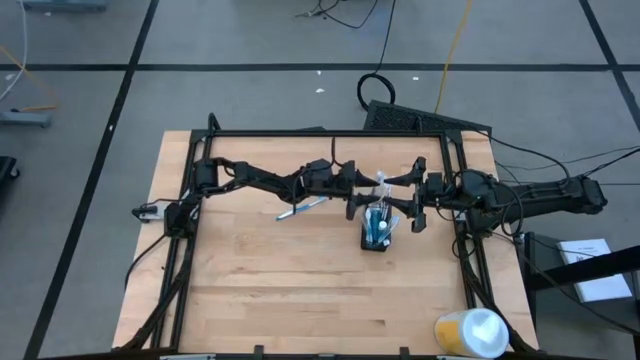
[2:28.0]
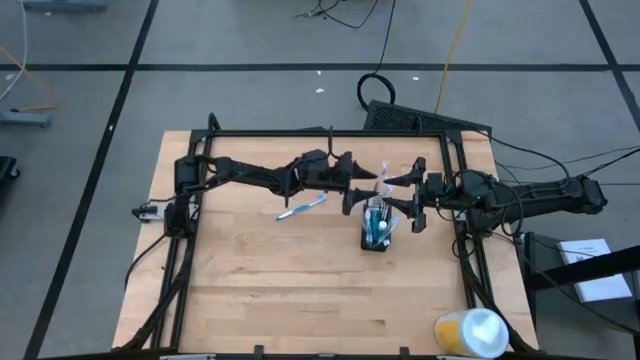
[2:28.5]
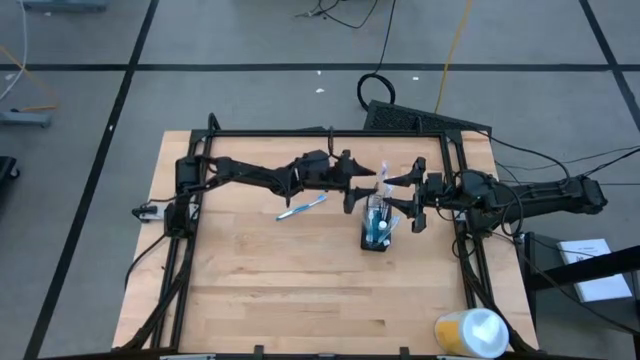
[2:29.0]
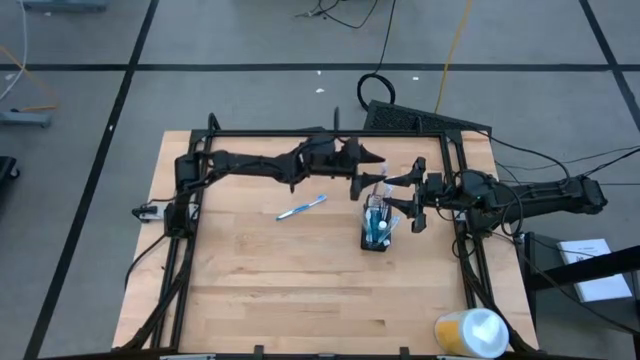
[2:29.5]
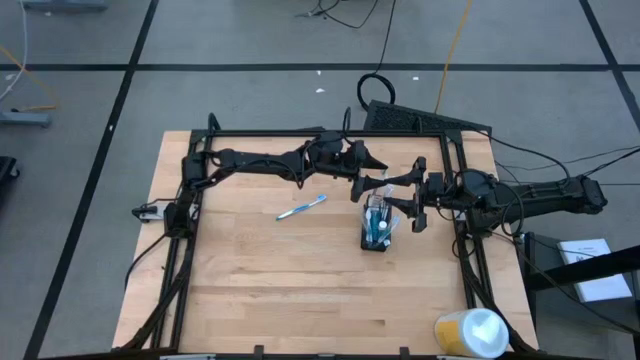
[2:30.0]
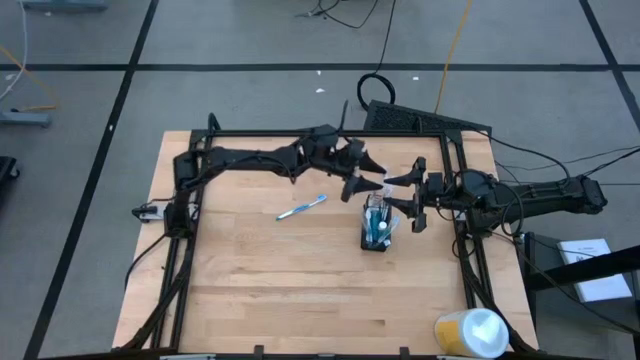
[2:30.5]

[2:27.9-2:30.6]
Task: Pick & Place toothbrushing station
Adjust the purple toothbrush in the mesh organizer

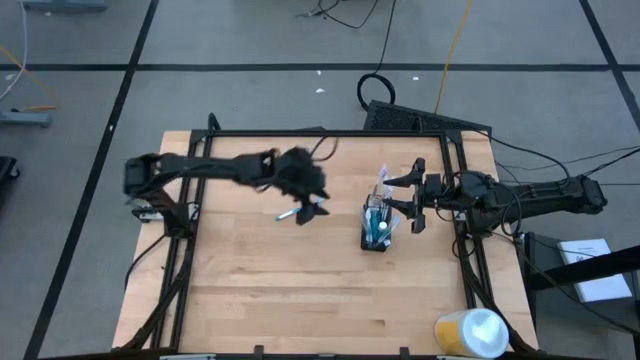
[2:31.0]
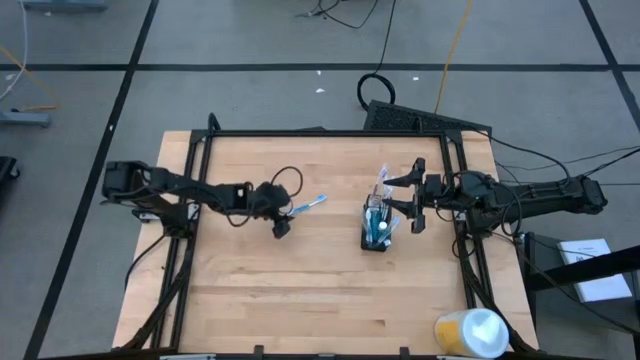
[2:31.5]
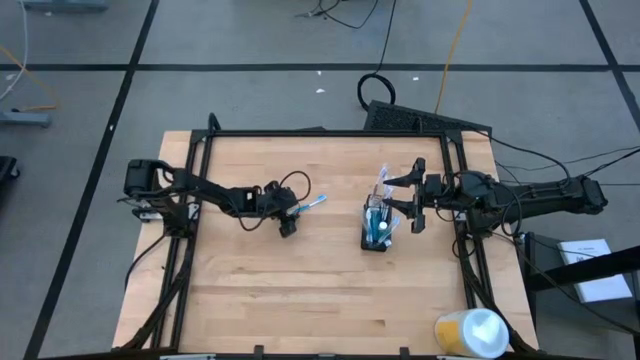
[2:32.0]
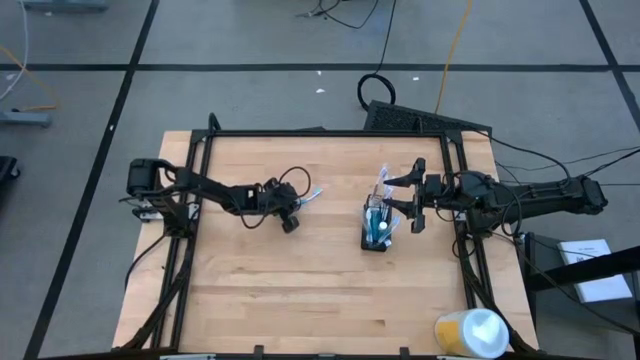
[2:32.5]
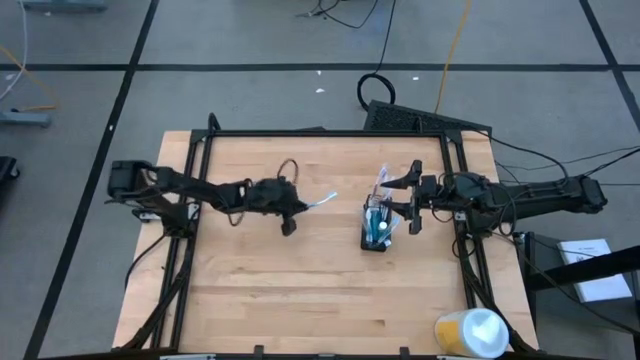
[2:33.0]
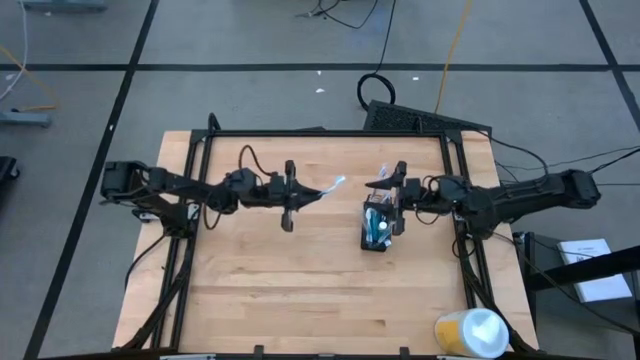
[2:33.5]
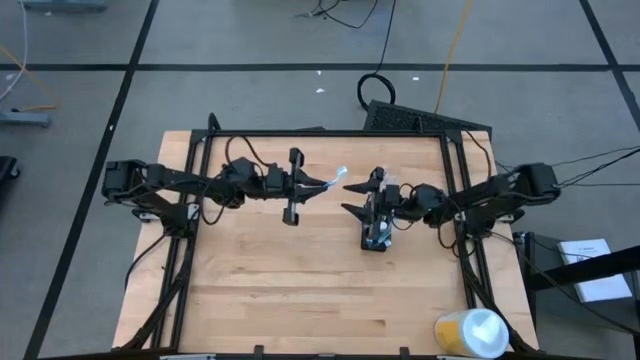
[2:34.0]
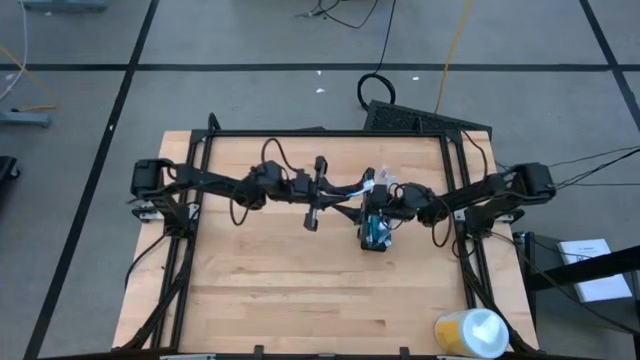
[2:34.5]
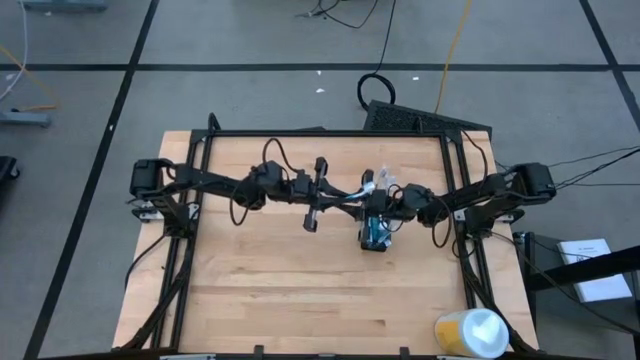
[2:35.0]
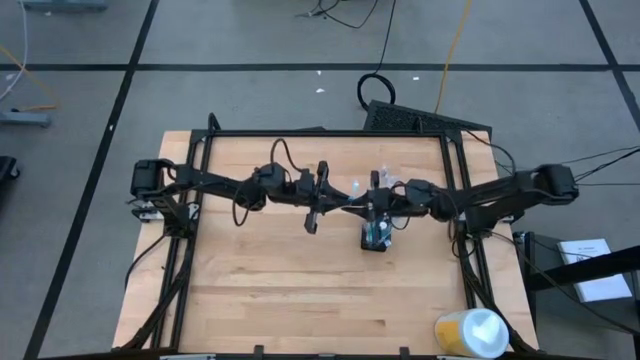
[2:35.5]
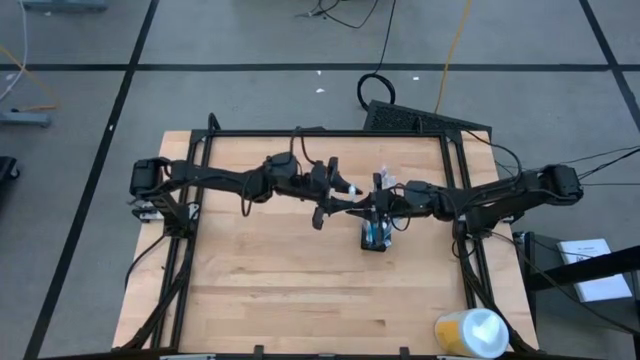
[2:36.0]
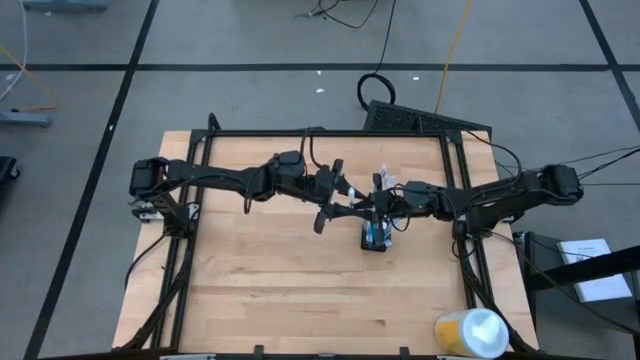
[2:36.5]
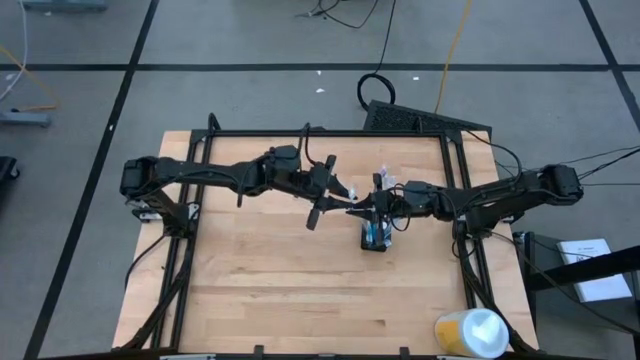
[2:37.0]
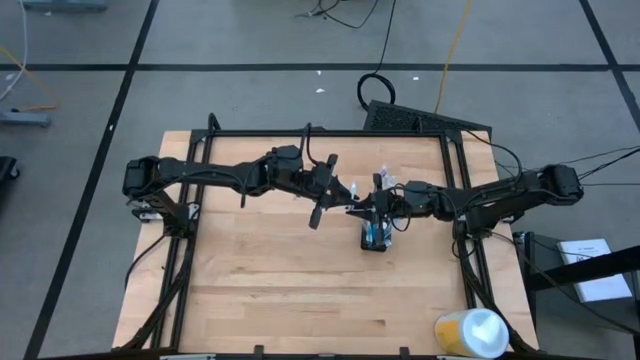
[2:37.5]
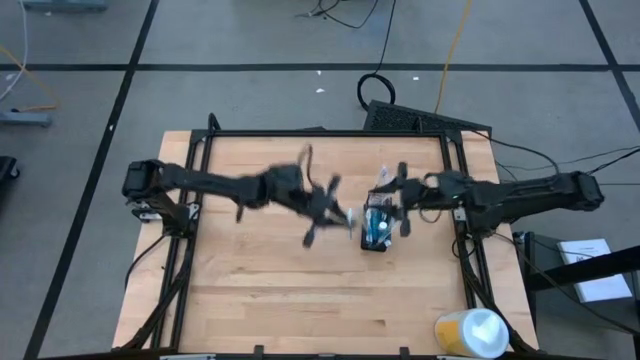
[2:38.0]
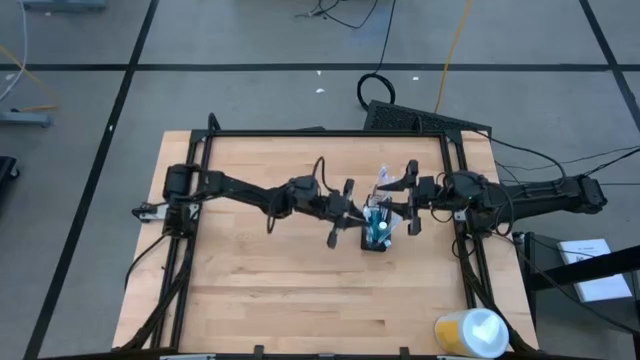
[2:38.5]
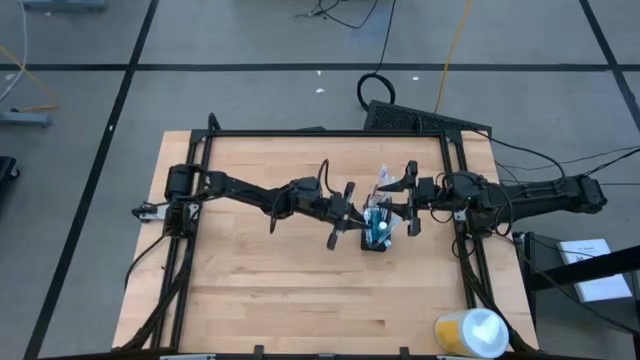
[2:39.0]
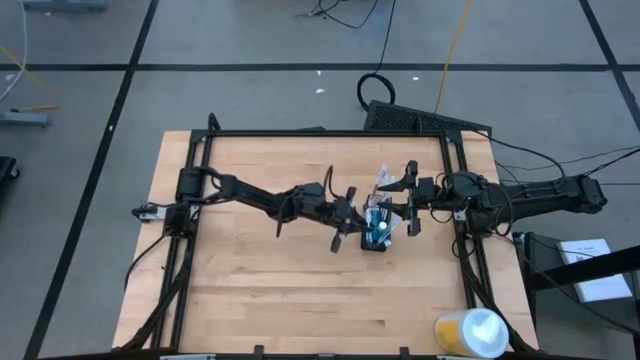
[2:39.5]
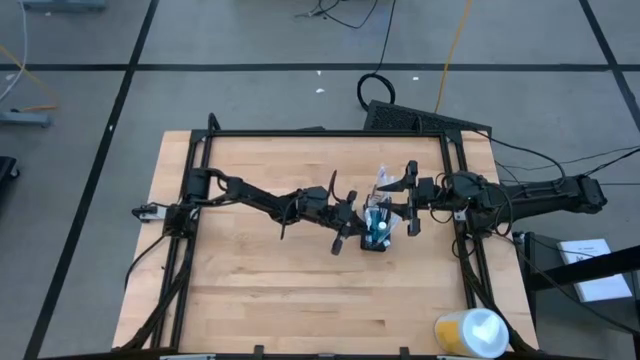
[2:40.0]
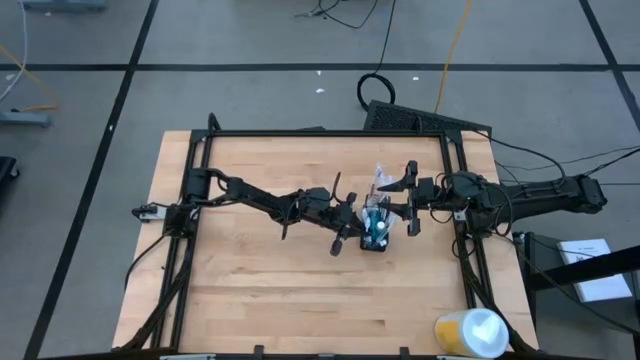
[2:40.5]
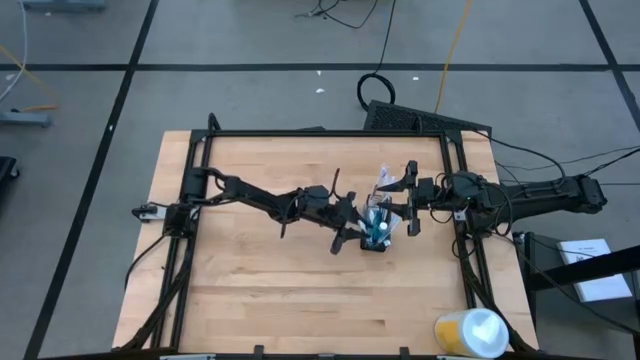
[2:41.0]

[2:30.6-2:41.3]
Put the blue toothbrush into the bottom section of the mesh organizer

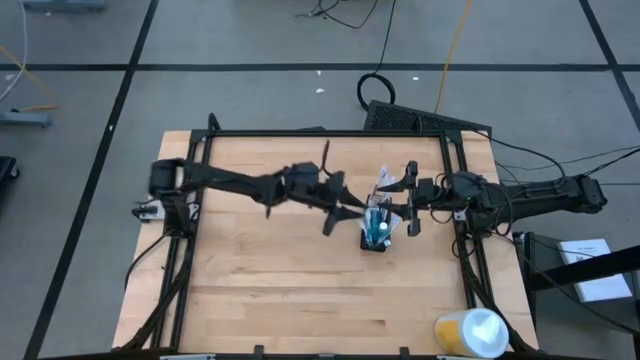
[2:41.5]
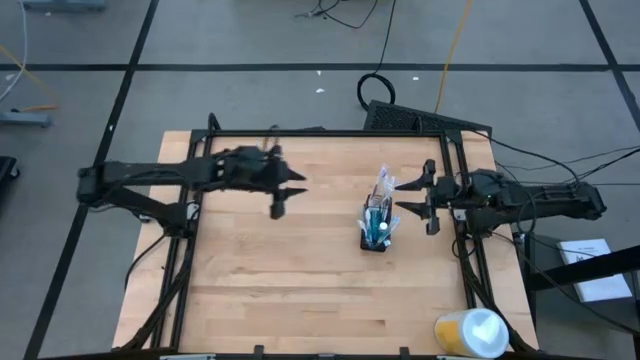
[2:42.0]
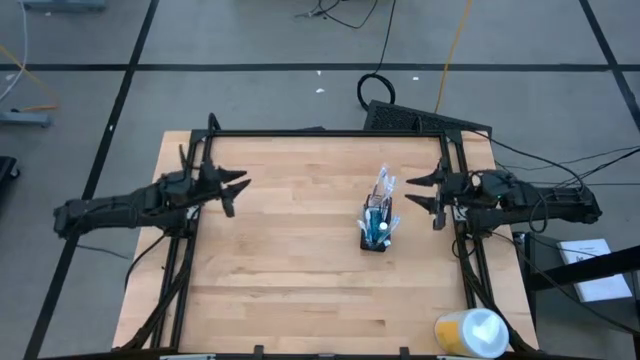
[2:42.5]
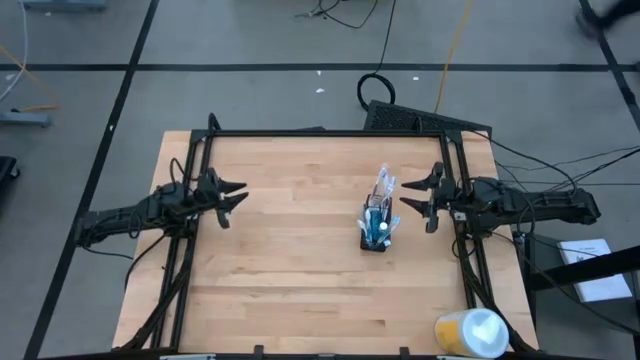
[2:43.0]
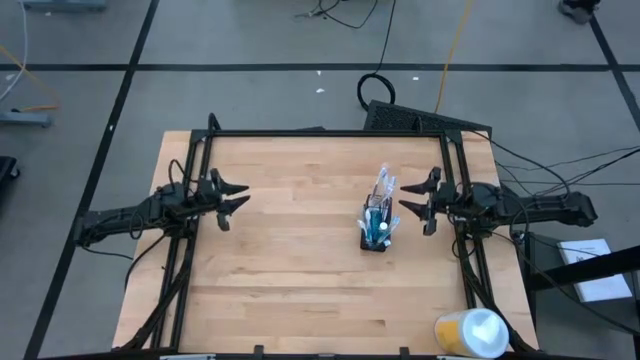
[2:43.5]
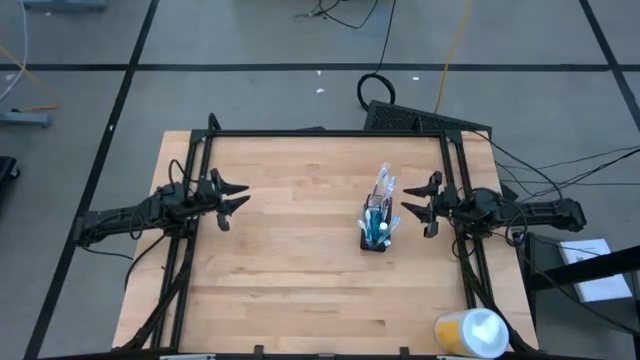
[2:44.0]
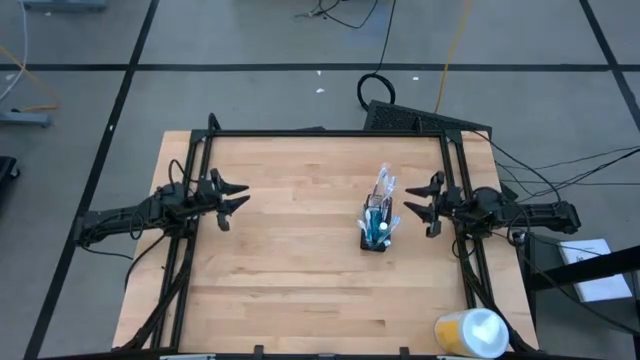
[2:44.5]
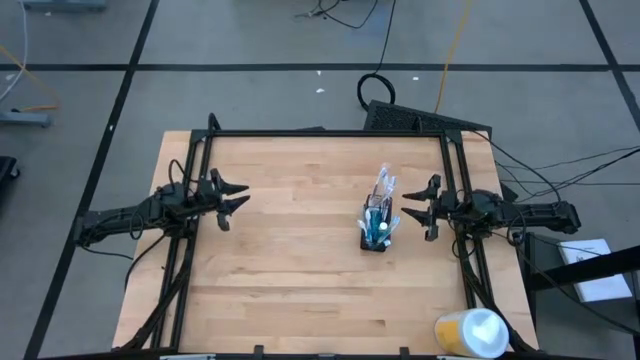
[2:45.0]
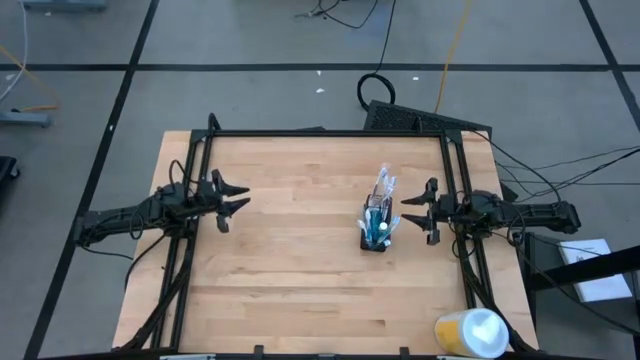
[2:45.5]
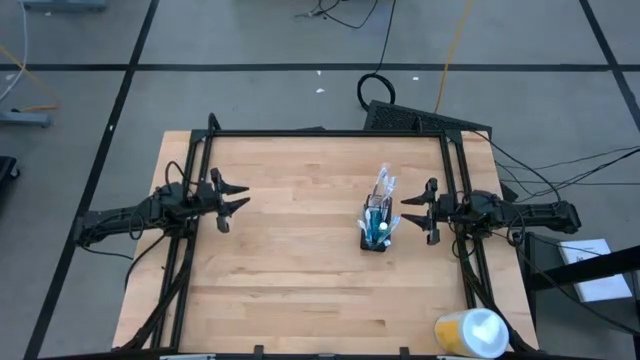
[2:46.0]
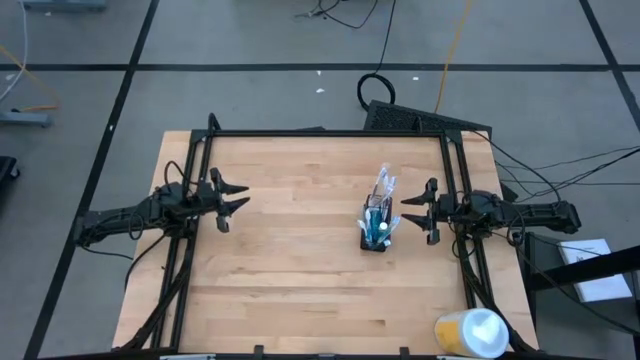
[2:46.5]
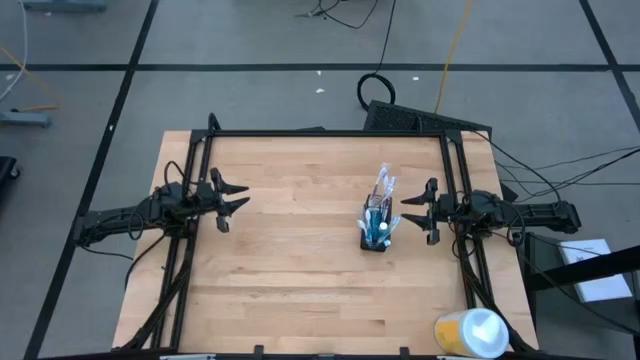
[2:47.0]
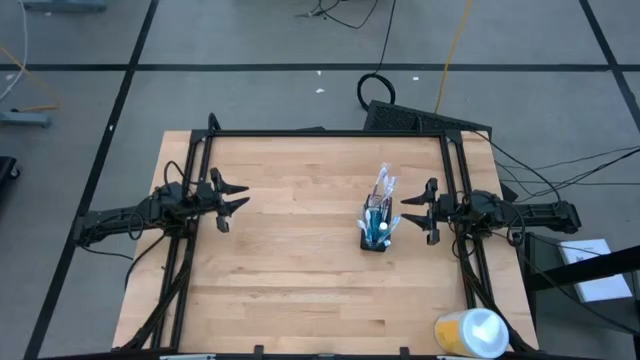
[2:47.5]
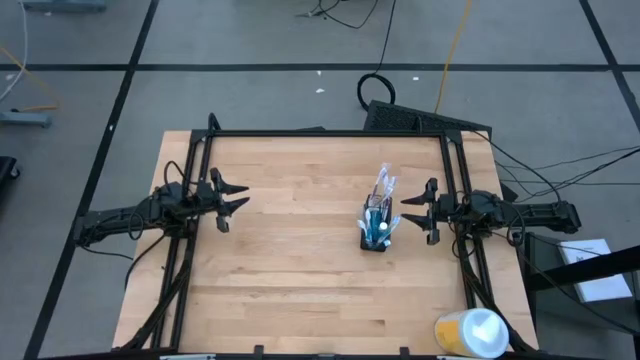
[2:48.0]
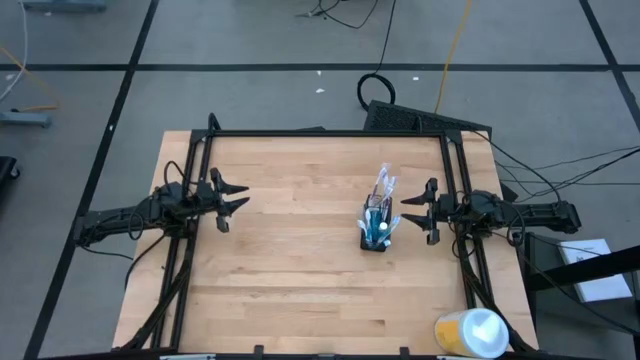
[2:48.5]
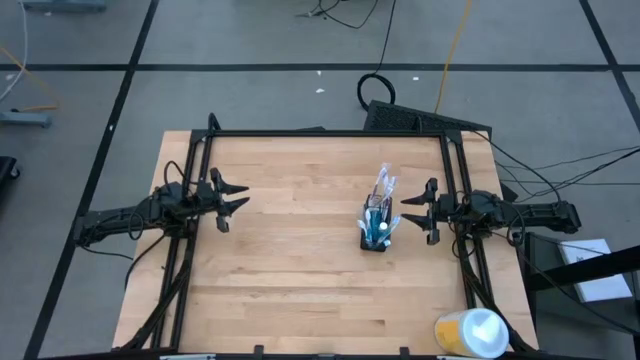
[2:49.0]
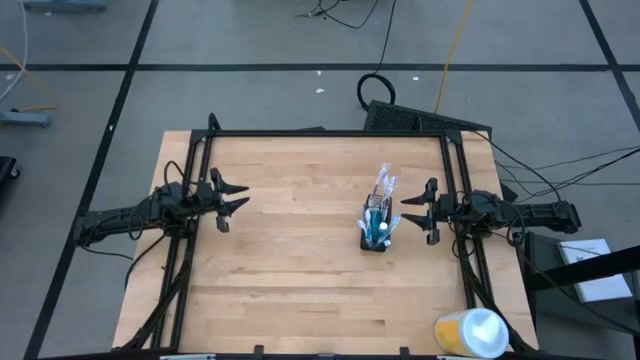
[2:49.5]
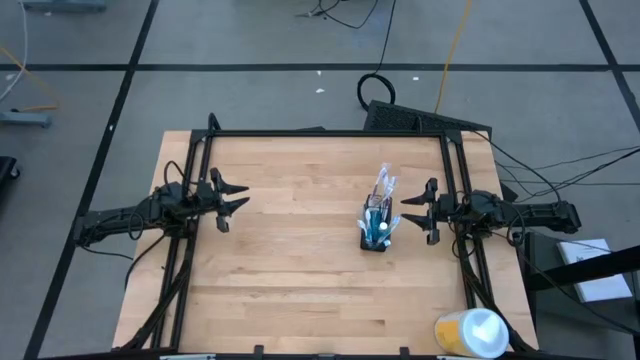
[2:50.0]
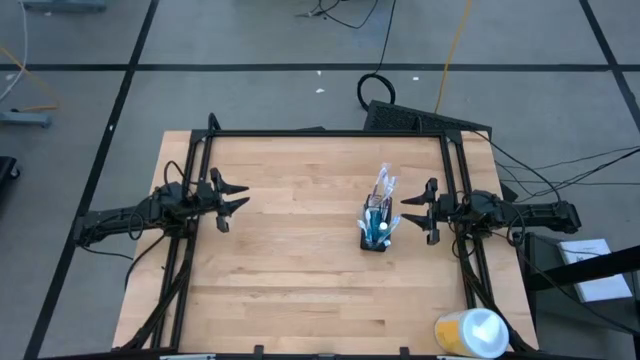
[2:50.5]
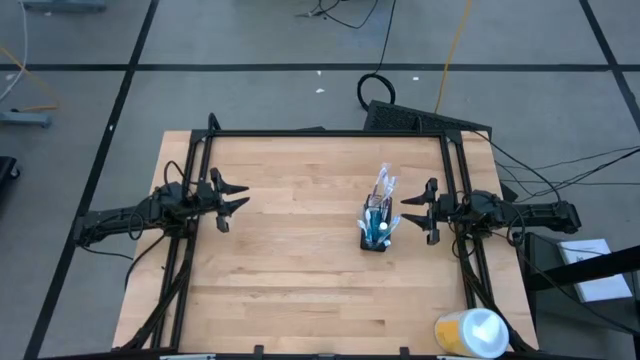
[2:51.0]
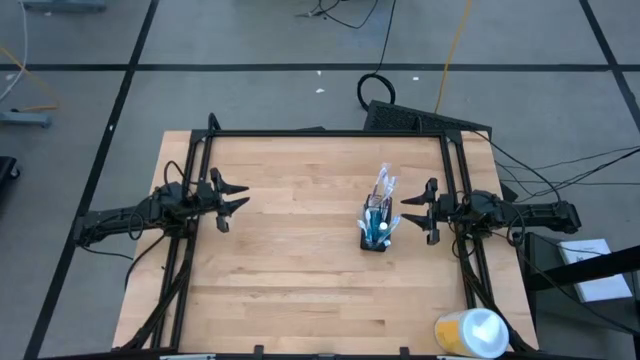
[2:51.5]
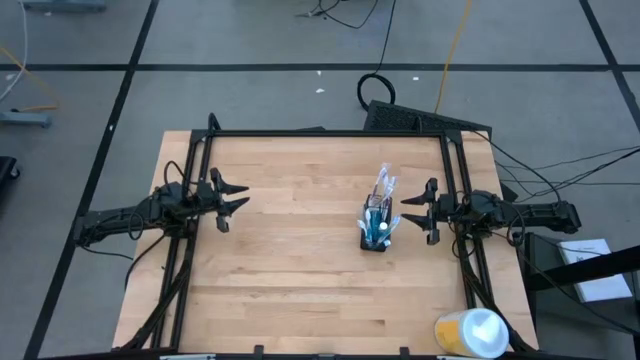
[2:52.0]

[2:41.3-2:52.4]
Return to Home Position
